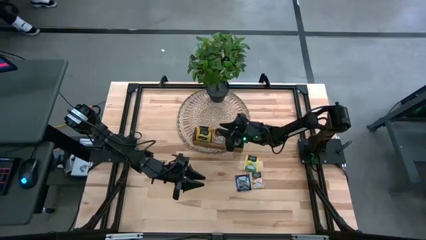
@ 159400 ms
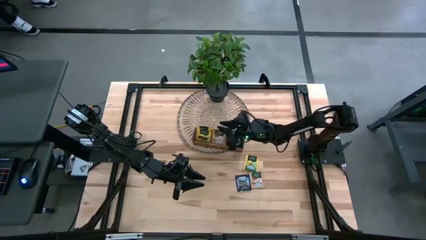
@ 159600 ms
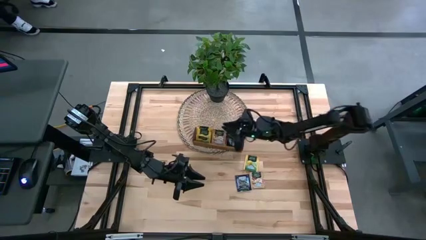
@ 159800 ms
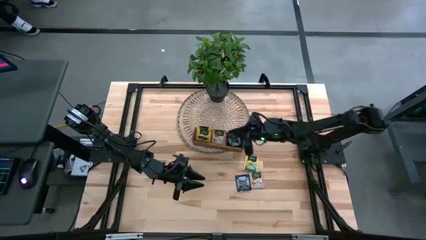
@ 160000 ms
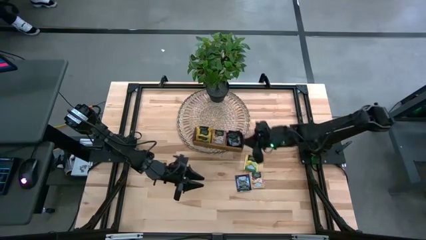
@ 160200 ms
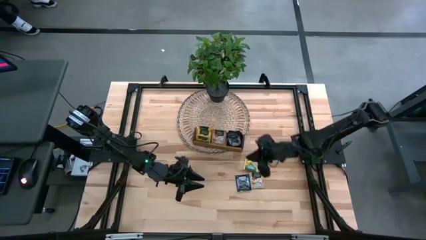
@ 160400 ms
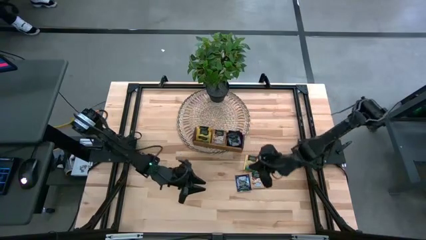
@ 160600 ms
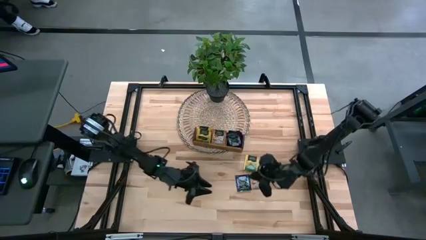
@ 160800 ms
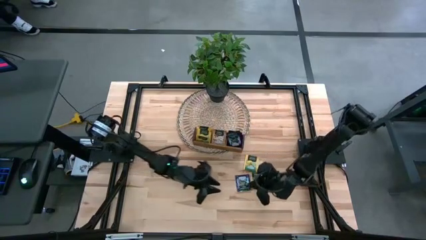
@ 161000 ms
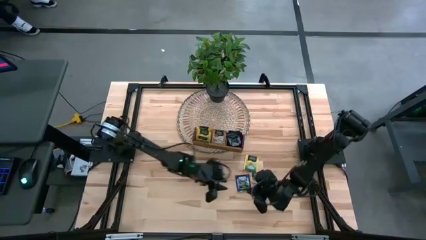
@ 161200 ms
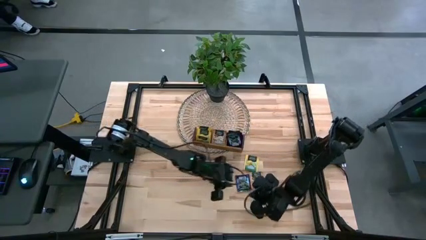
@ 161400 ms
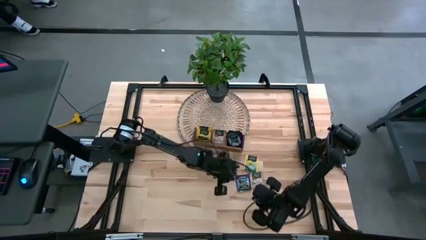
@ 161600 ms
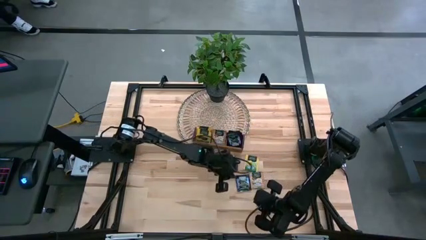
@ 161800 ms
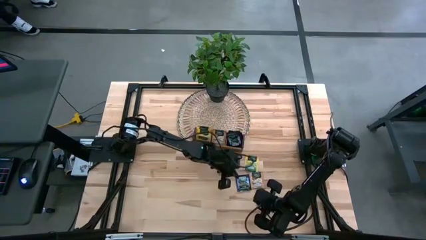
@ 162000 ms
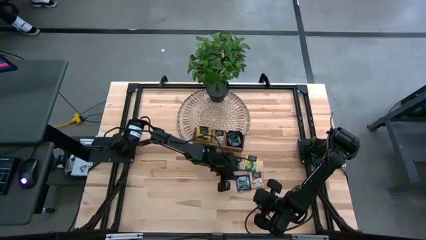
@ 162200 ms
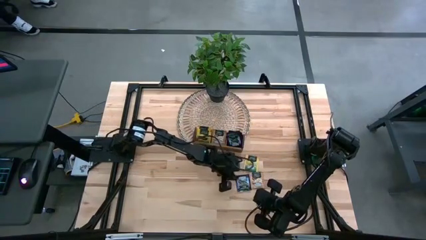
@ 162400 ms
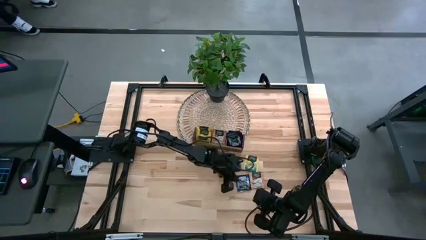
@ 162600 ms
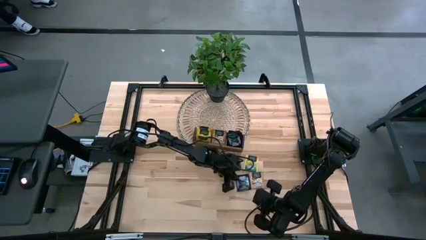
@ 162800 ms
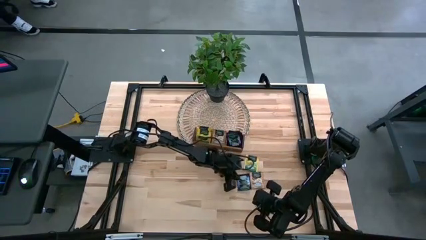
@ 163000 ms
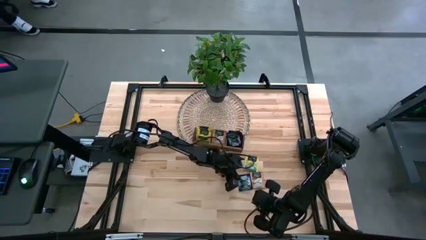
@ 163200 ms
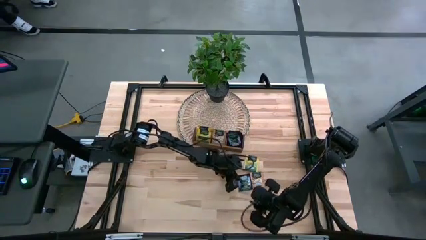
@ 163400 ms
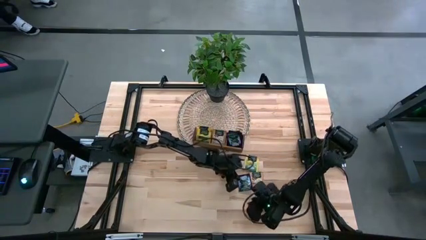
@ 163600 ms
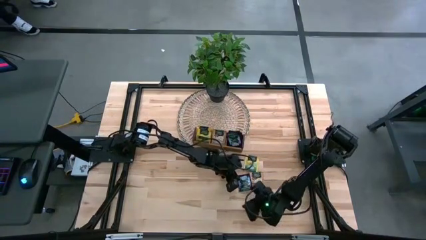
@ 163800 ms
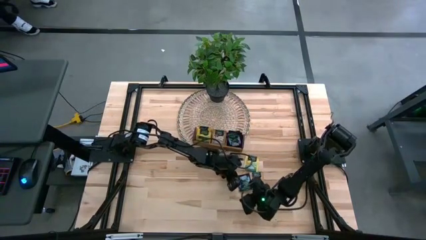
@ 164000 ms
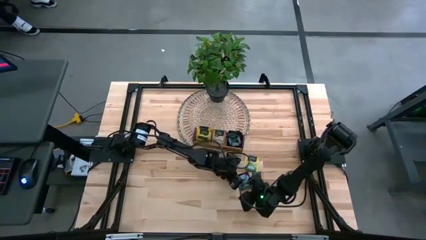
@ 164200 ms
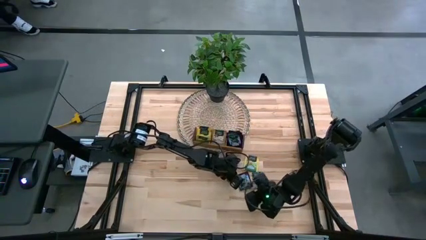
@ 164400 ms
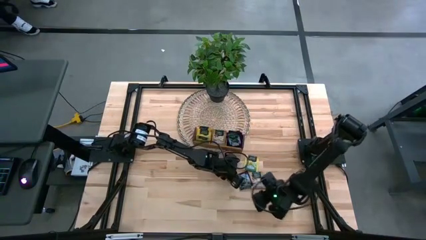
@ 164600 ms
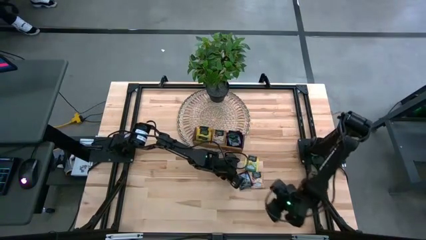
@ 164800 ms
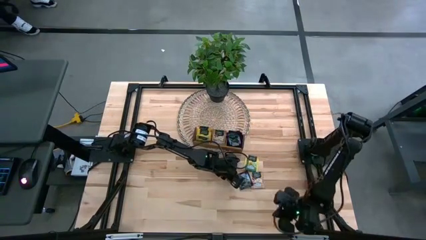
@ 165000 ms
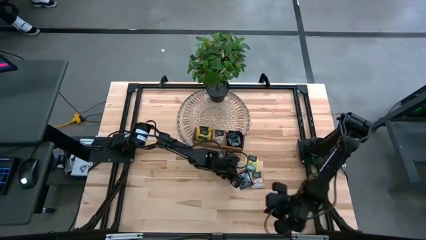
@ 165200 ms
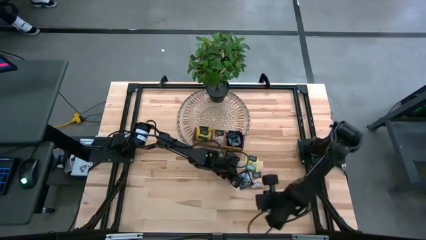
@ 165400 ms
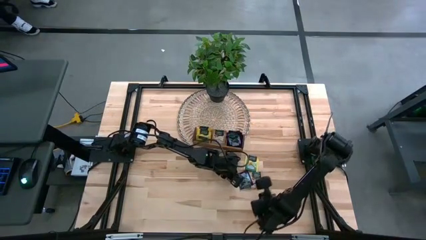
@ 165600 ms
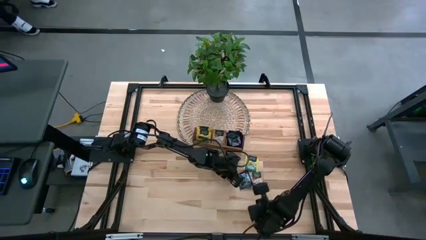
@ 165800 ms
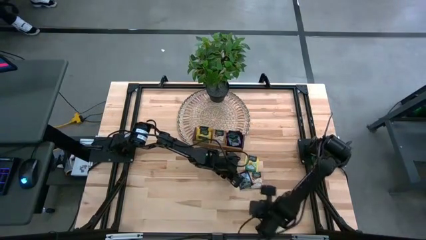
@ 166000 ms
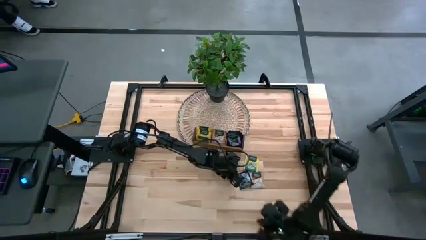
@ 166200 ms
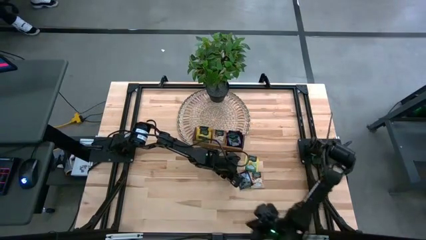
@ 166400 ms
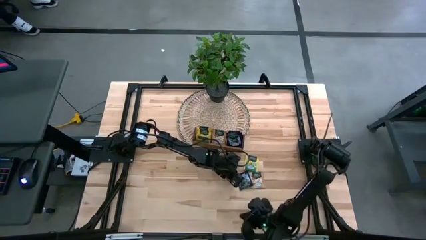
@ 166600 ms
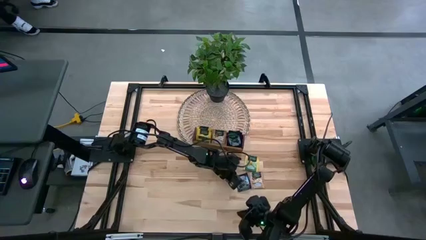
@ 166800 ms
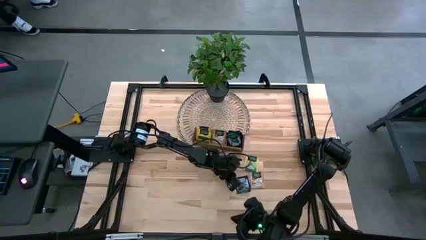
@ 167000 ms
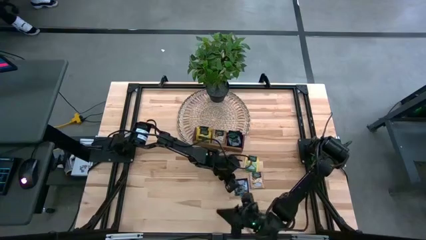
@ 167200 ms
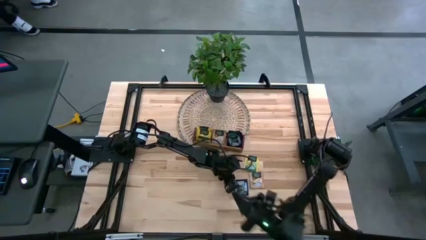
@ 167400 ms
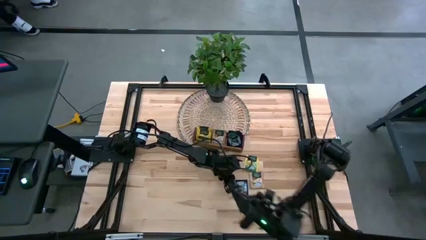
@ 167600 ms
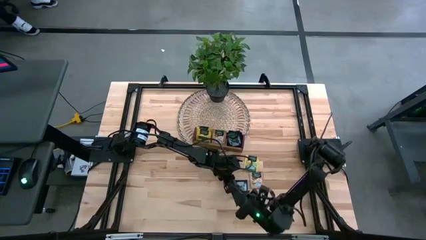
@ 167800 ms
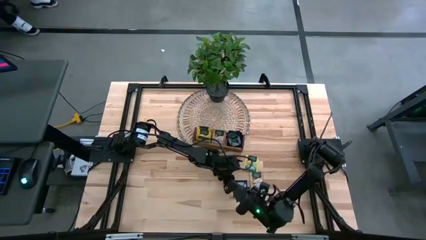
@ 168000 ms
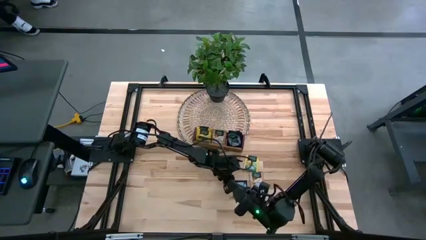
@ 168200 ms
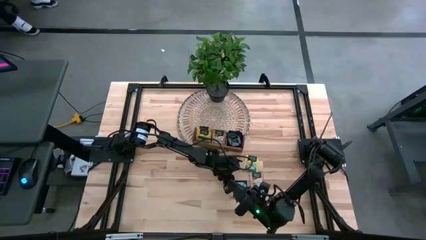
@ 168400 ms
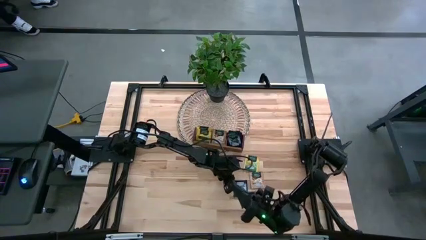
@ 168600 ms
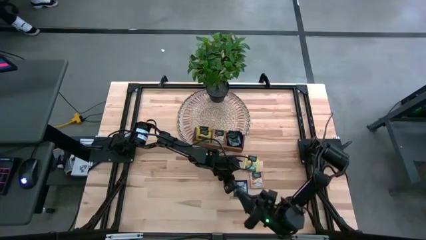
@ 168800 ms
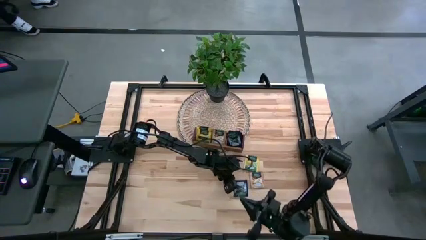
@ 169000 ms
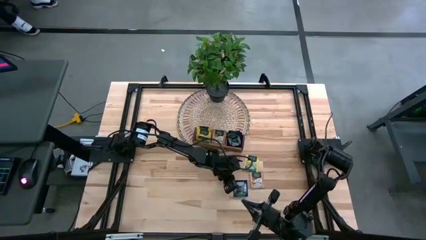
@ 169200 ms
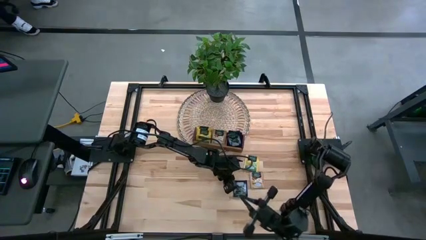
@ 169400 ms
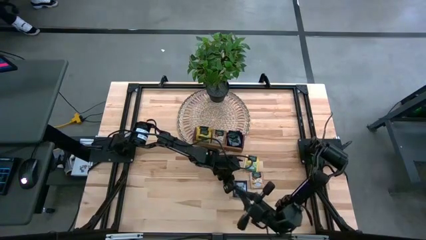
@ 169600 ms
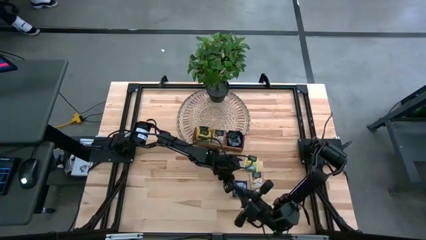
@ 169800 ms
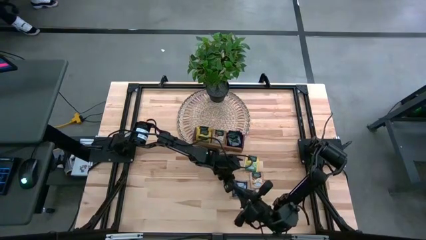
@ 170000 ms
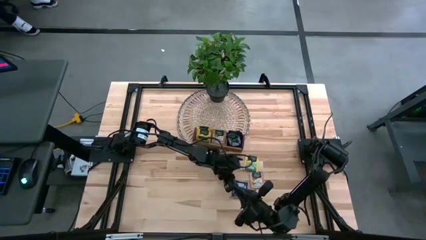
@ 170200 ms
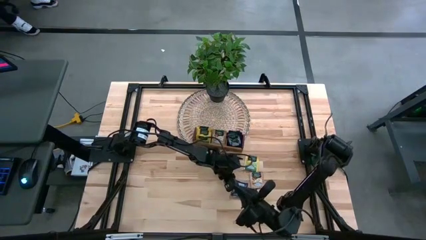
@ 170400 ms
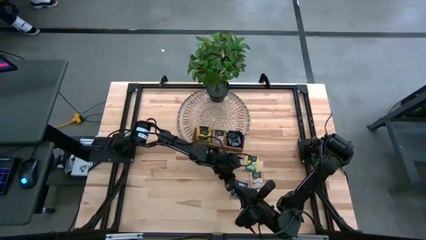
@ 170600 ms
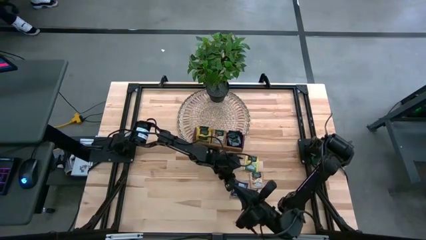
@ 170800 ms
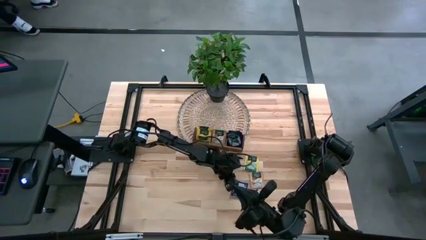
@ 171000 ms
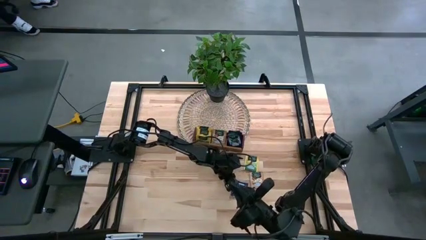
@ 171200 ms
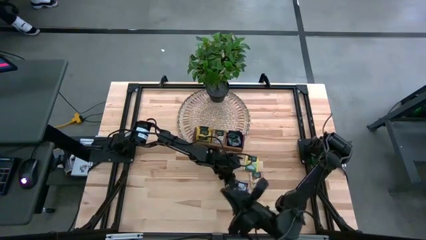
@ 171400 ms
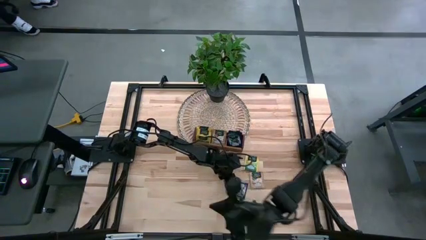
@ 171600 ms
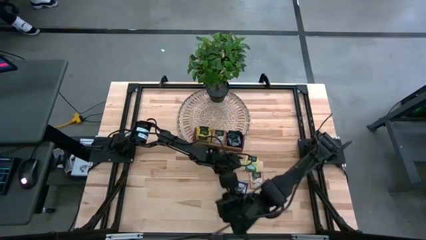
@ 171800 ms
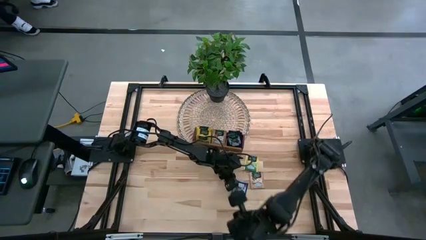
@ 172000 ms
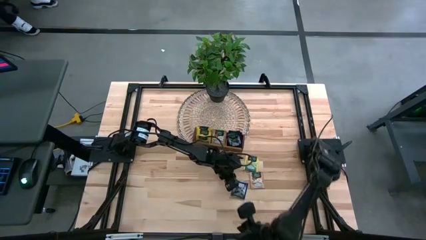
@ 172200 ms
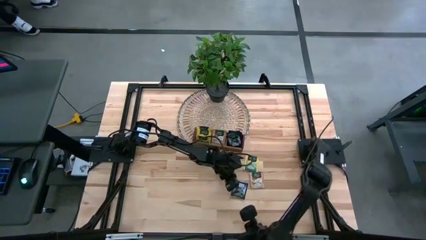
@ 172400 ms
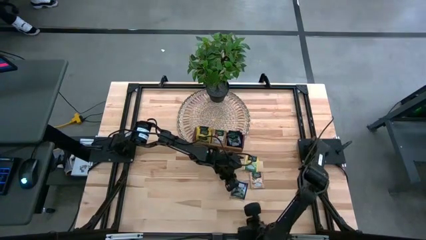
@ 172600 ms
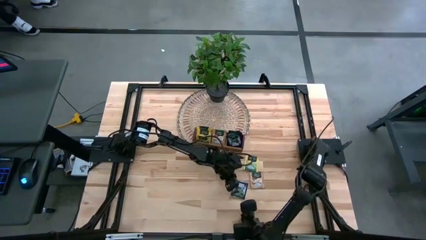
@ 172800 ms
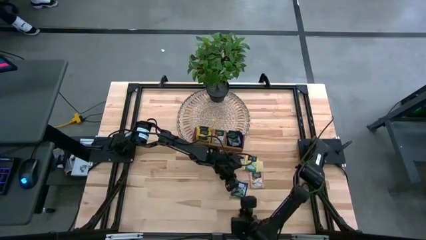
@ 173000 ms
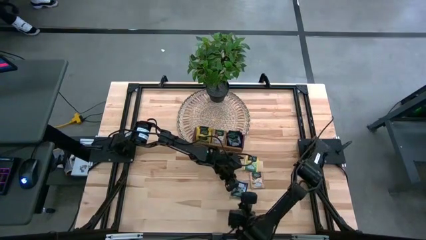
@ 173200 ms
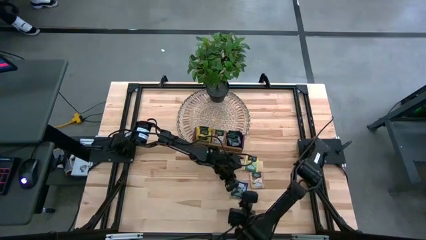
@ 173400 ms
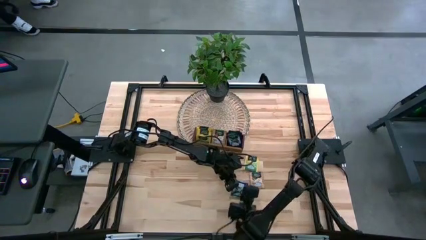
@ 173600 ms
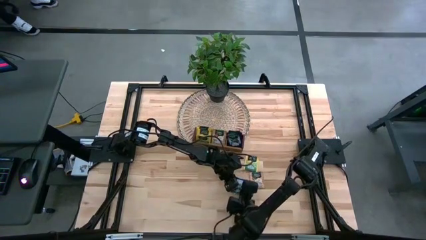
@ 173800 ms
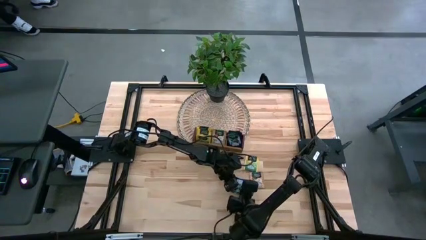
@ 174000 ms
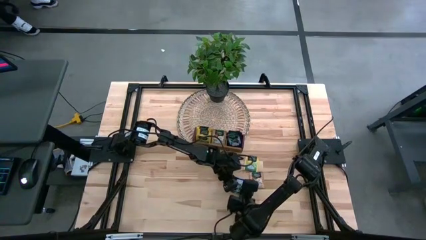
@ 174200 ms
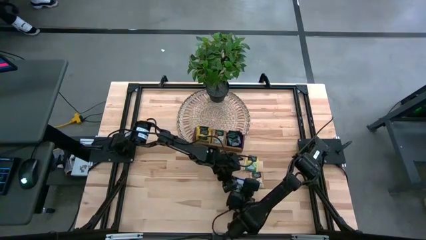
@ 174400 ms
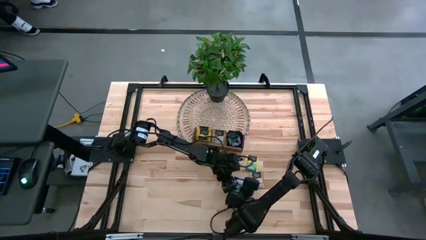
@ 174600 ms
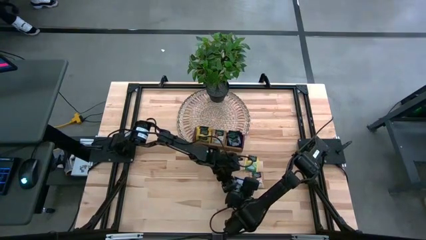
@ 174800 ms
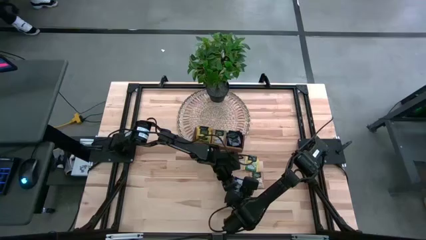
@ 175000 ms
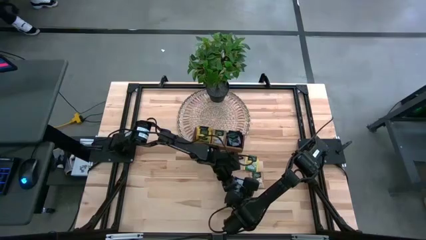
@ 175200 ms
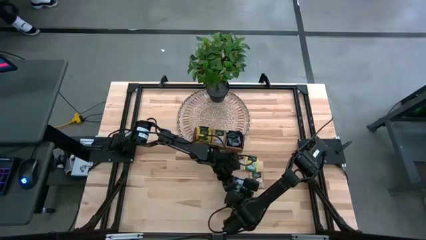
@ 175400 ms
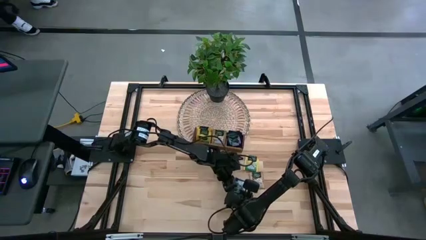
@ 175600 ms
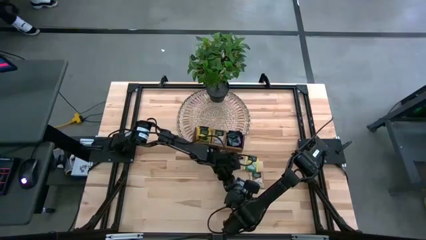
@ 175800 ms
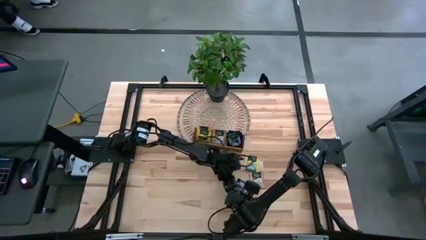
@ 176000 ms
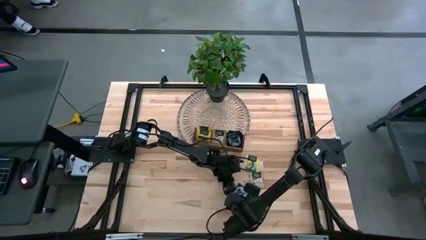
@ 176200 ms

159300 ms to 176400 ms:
Task: Pick & Place Tea
Put the violet tea bag into the right section of the wooden organizer
